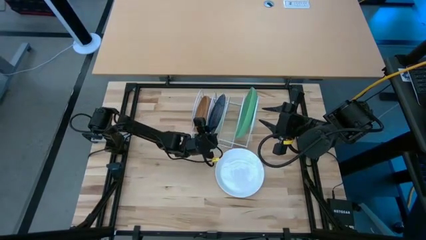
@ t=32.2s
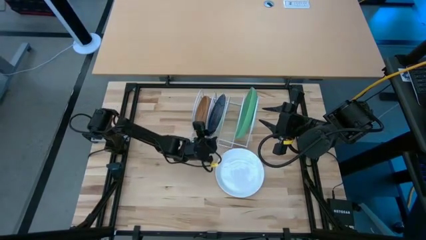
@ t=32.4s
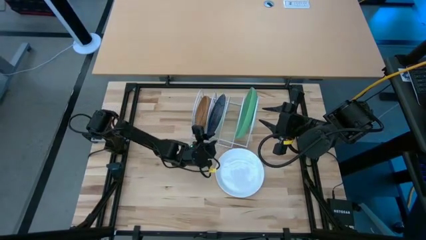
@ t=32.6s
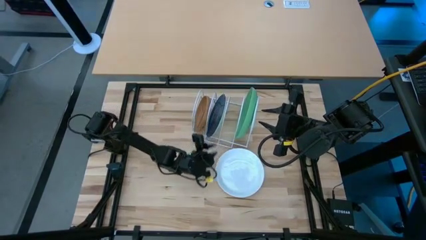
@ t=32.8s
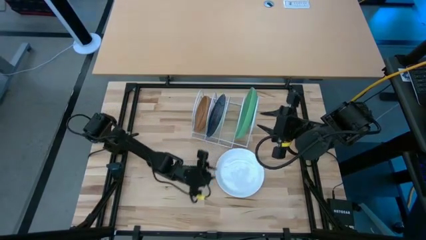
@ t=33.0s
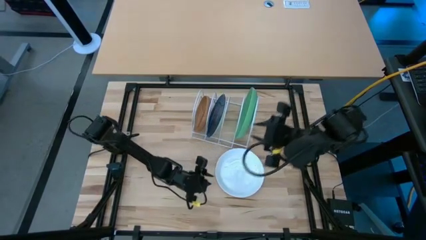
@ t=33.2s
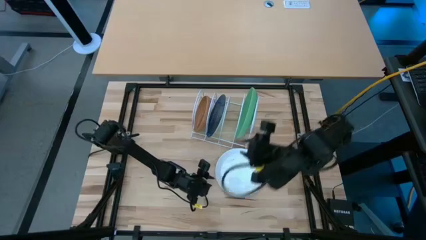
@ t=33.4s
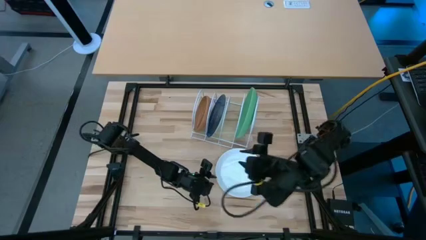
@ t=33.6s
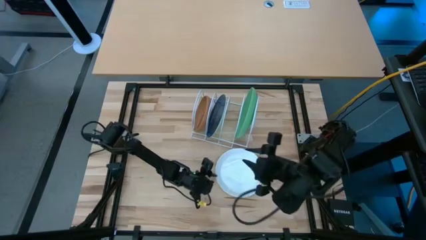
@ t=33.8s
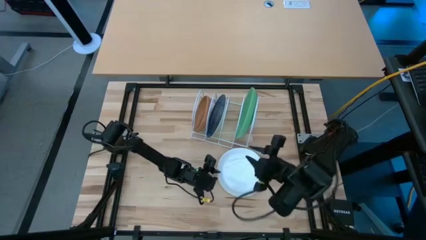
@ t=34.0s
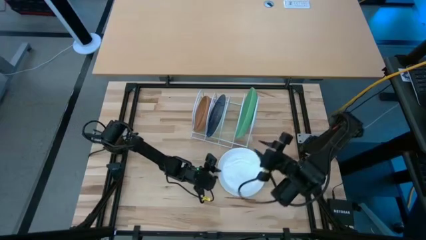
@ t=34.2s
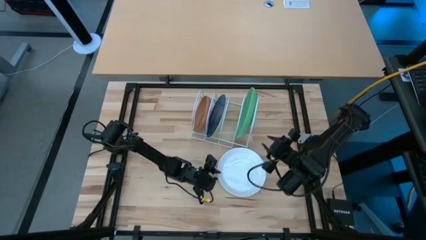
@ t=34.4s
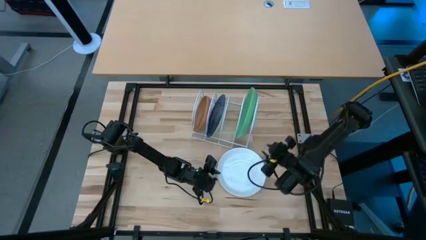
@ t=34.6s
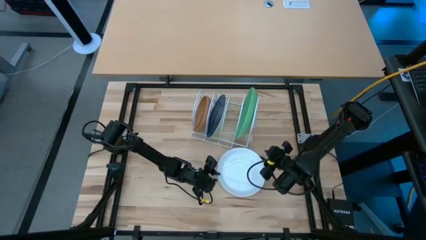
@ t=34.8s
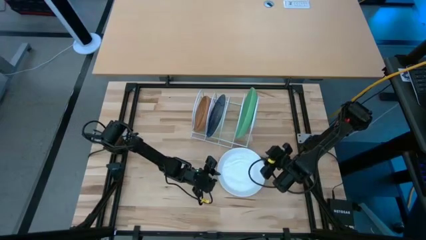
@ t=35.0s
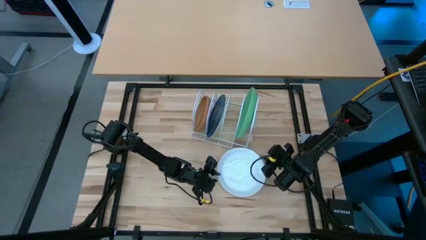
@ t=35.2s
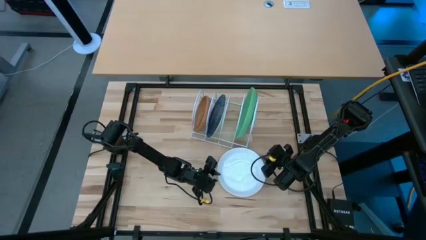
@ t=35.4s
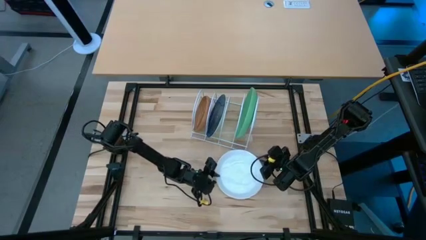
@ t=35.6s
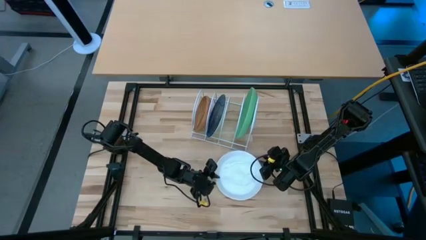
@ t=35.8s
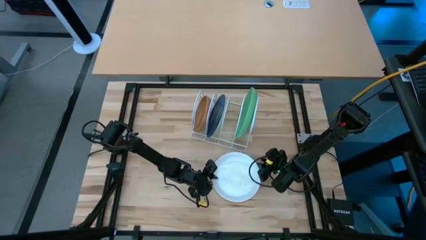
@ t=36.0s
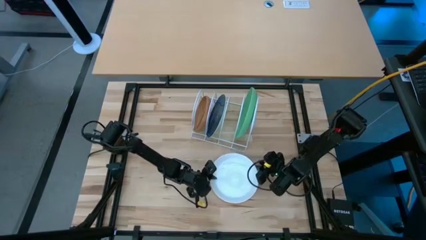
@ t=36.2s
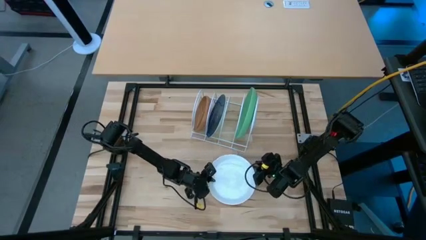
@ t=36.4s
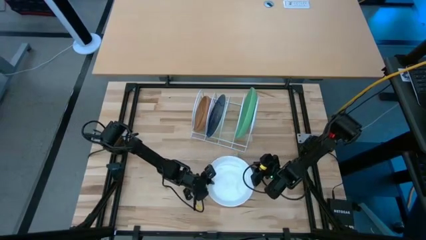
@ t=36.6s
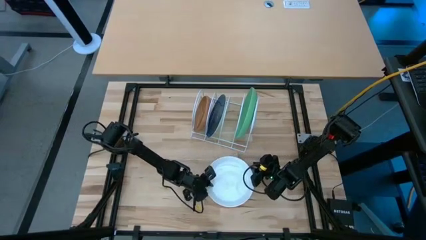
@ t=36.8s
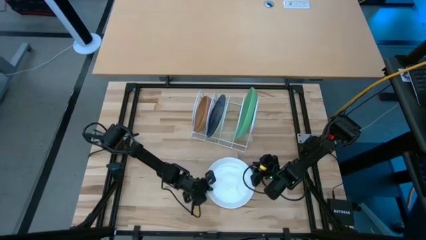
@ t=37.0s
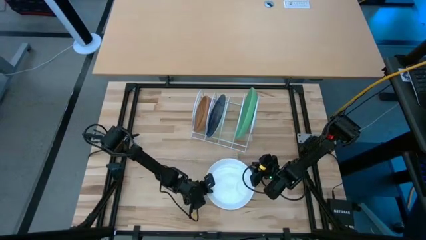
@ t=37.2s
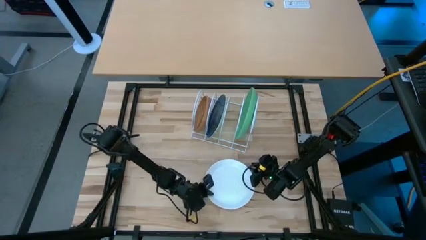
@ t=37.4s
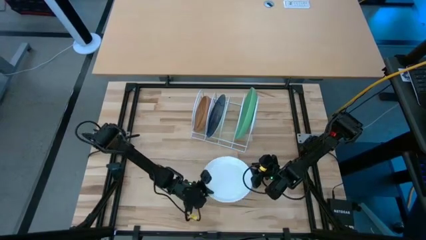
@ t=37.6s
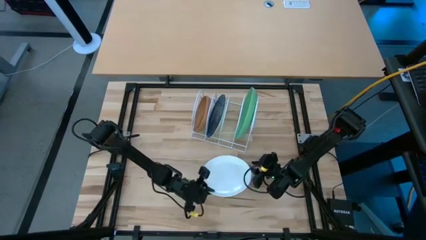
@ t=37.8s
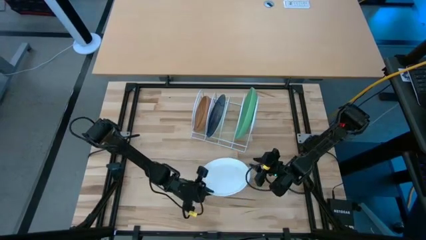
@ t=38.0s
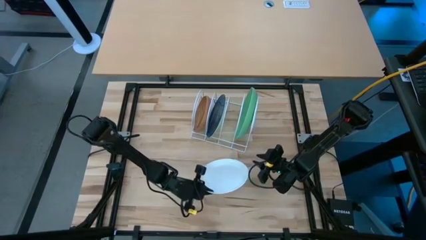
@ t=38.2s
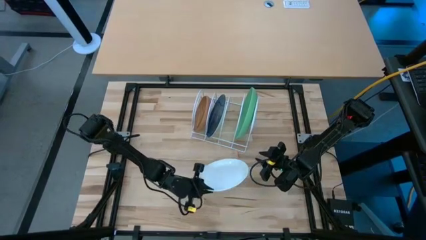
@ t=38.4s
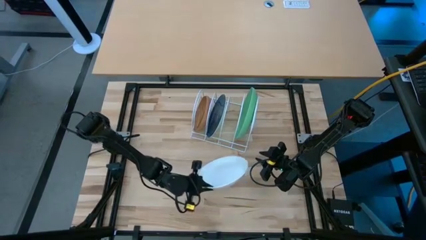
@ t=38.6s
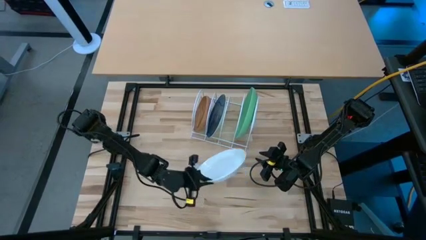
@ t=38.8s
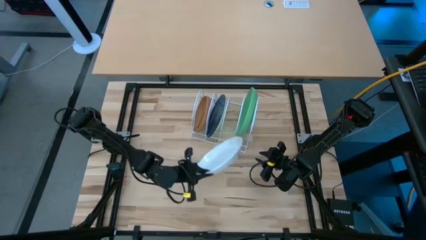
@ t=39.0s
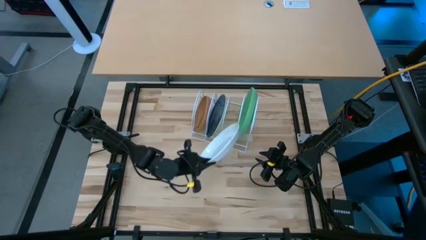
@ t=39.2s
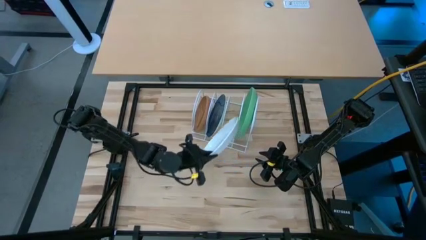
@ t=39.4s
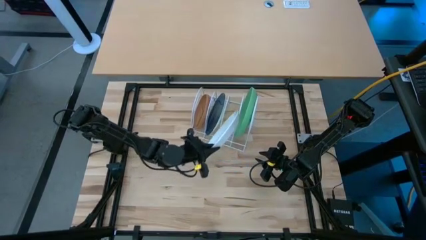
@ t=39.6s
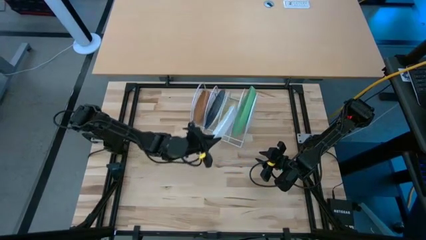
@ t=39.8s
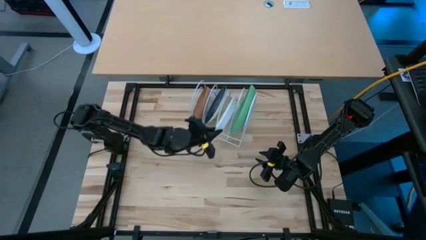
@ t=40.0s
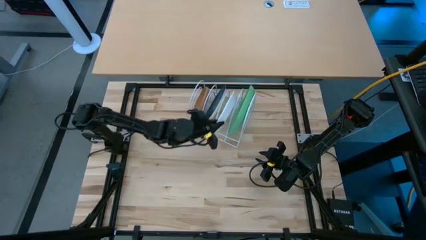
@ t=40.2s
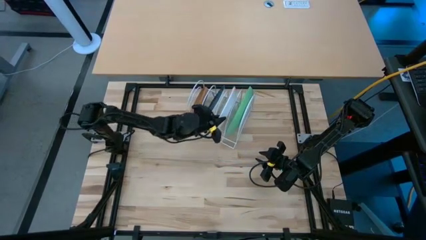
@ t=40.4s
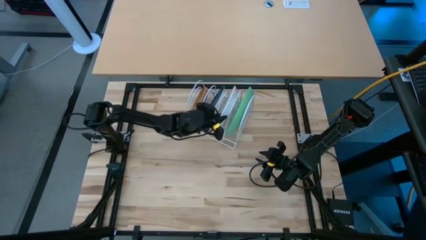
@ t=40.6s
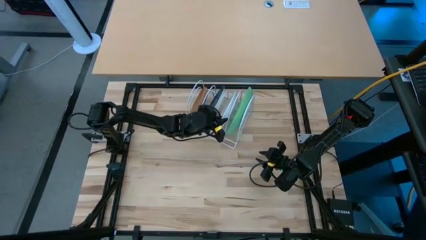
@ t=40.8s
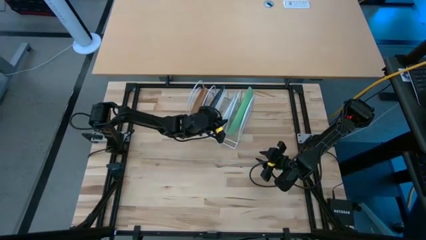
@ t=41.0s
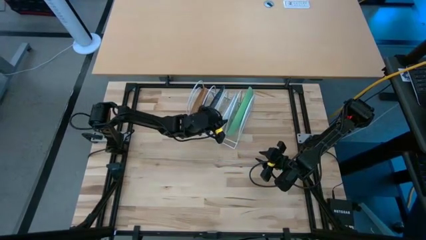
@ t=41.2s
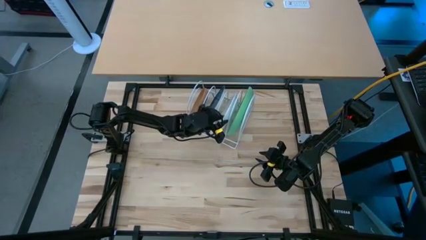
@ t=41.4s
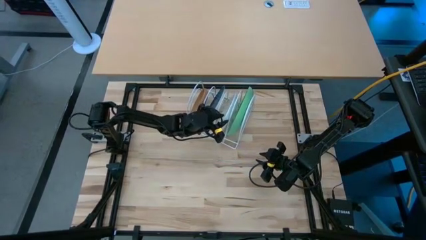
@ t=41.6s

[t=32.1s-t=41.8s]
Task: Sort dishes
Put the white plate in the dish rack

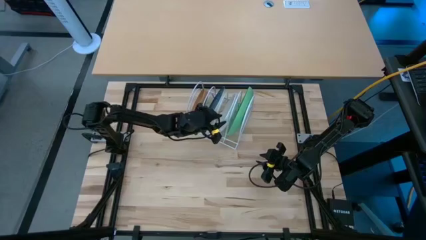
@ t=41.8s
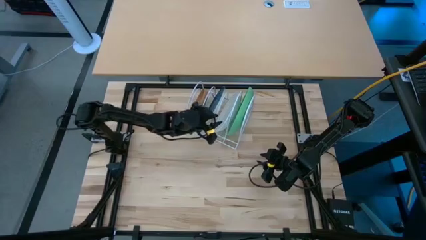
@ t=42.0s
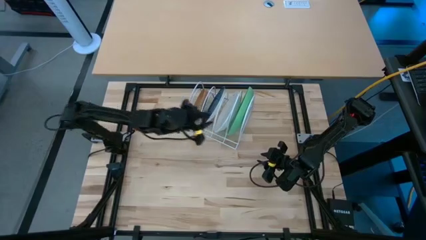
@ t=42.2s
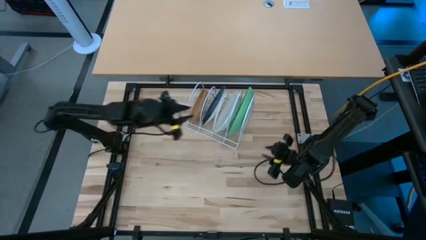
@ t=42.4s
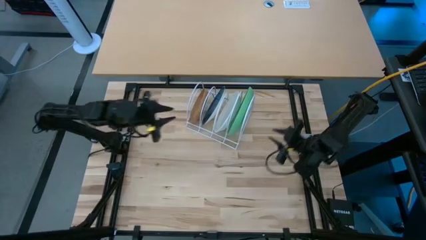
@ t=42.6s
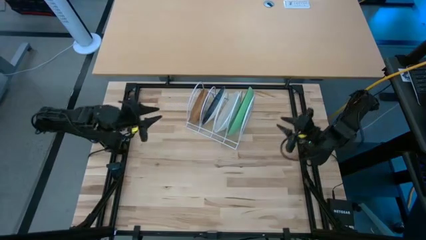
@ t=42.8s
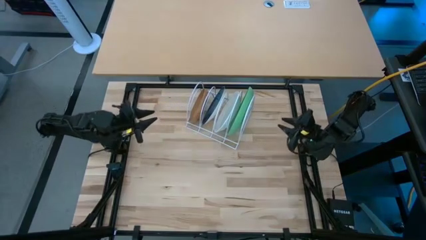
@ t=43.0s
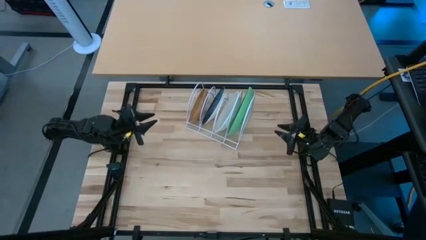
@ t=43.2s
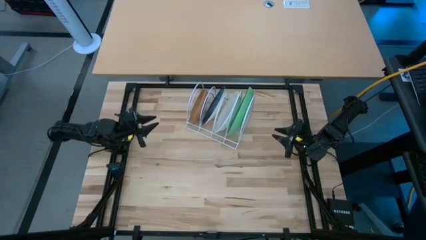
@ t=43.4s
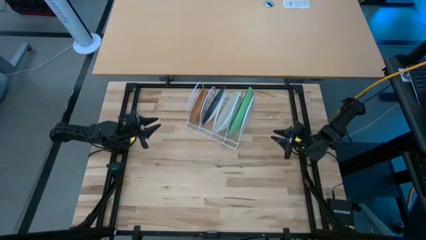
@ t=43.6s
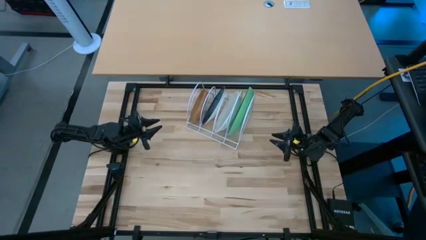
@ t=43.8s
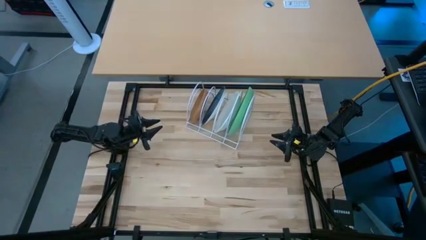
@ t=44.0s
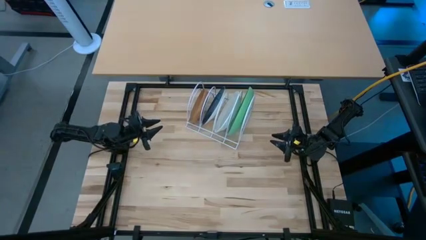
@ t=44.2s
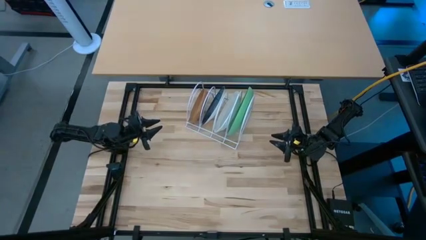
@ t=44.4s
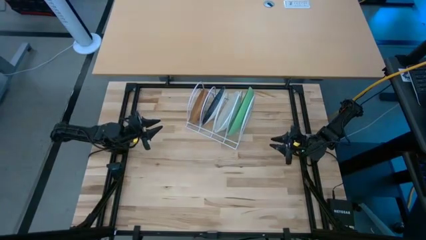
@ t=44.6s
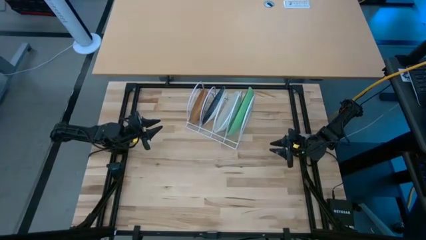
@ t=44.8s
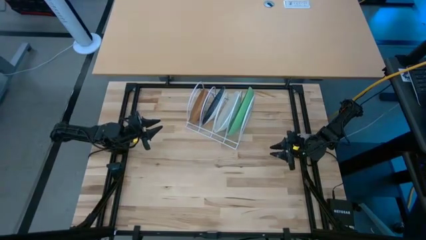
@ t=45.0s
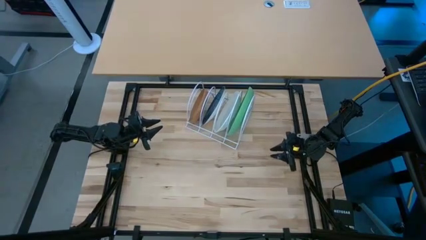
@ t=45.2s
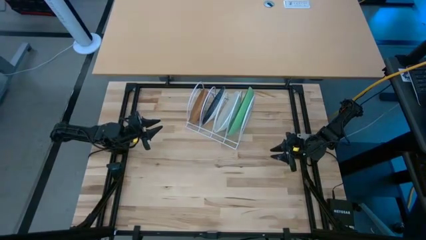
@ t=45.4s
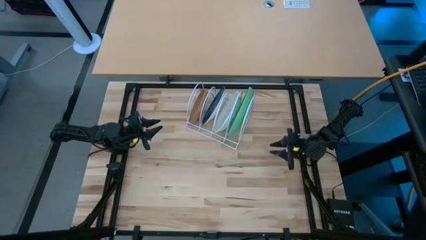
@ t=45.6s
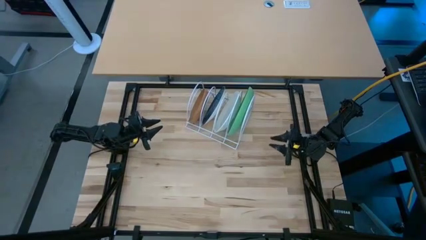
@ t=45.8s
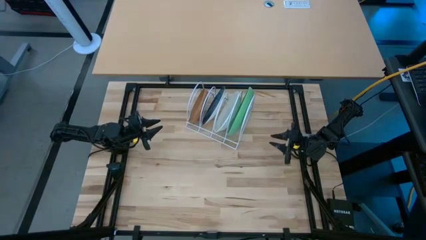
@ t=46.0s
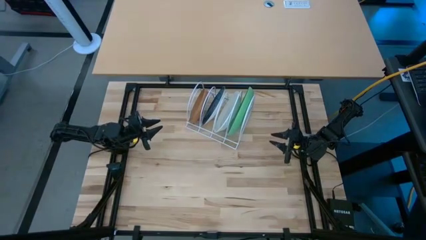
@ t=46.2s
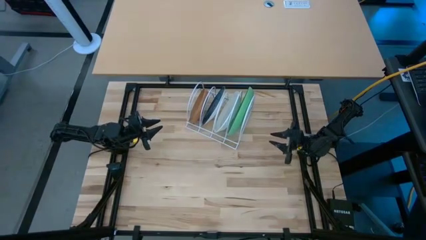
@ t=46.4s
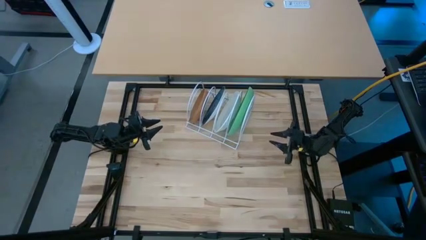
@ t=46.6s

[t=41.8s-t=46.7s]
Return to Home Position
